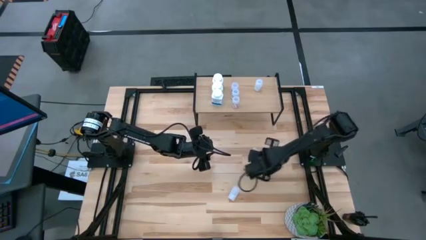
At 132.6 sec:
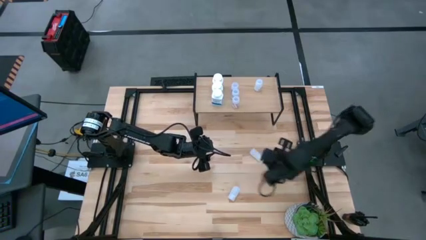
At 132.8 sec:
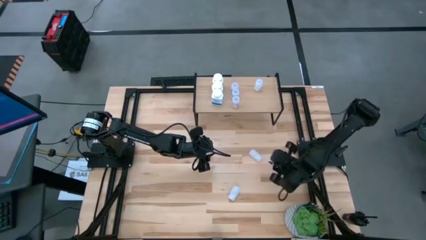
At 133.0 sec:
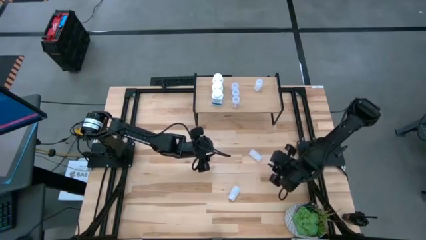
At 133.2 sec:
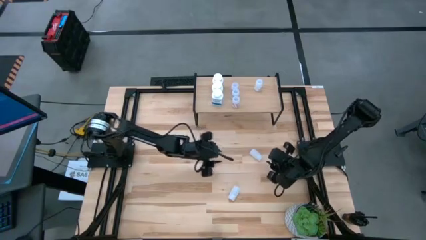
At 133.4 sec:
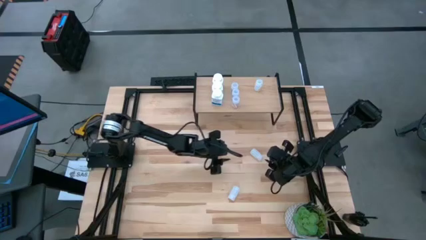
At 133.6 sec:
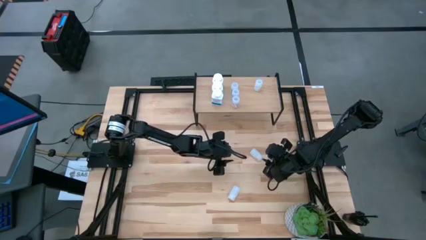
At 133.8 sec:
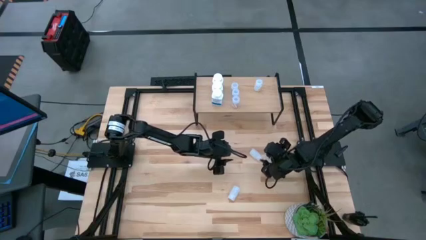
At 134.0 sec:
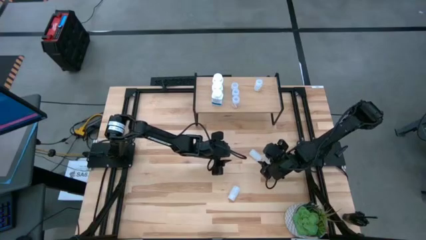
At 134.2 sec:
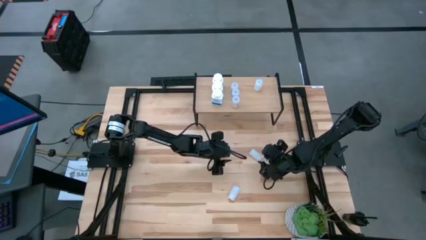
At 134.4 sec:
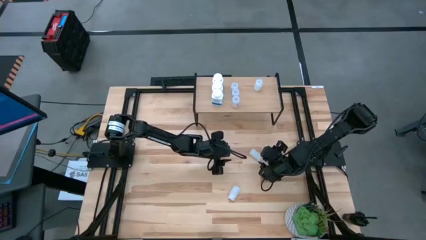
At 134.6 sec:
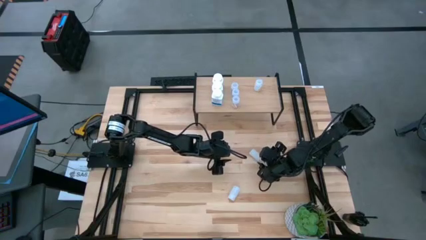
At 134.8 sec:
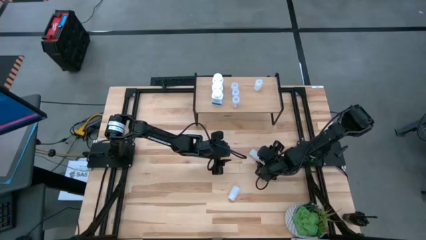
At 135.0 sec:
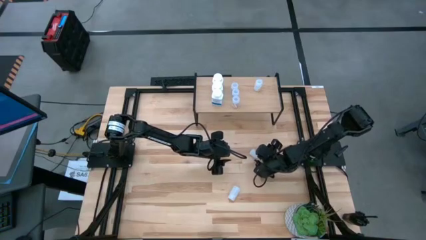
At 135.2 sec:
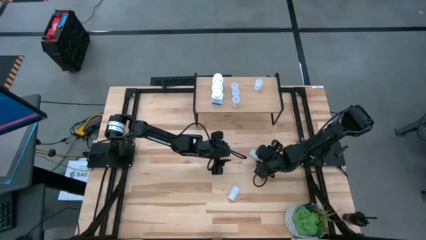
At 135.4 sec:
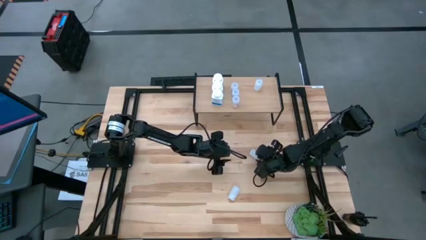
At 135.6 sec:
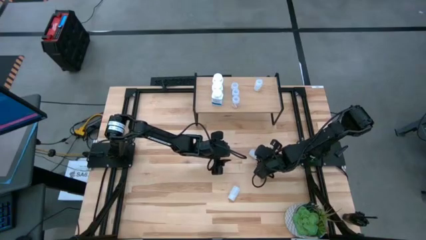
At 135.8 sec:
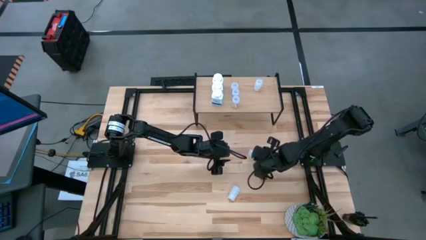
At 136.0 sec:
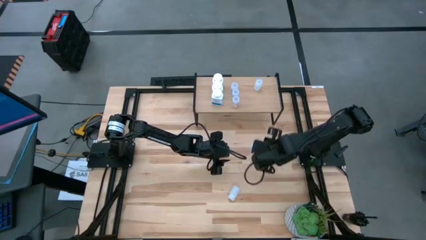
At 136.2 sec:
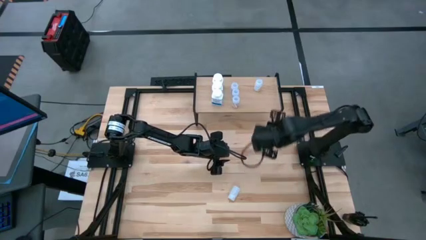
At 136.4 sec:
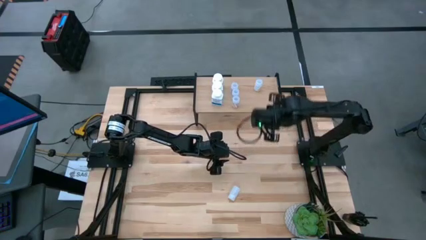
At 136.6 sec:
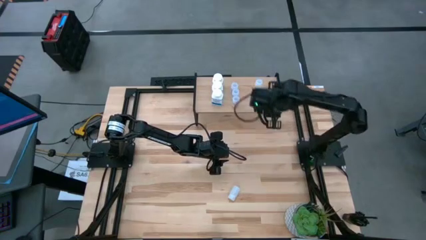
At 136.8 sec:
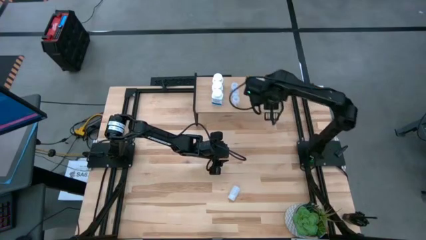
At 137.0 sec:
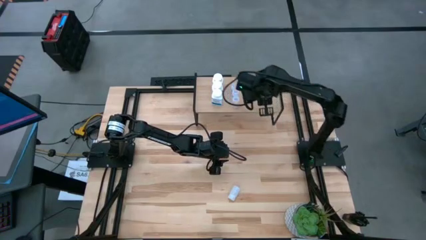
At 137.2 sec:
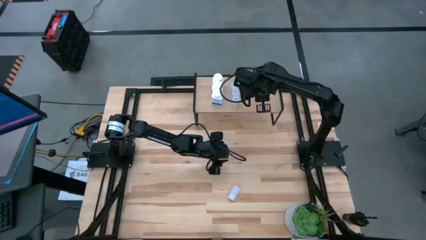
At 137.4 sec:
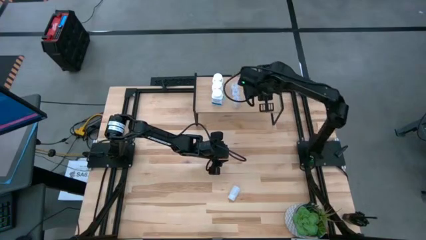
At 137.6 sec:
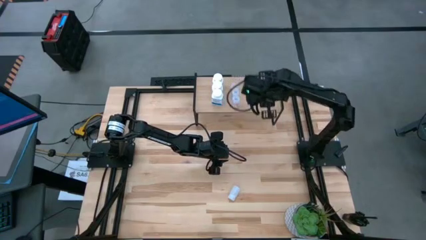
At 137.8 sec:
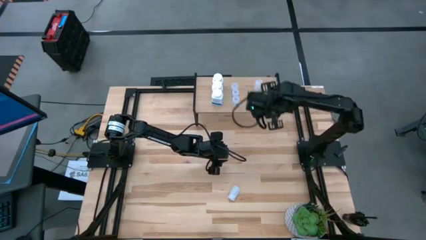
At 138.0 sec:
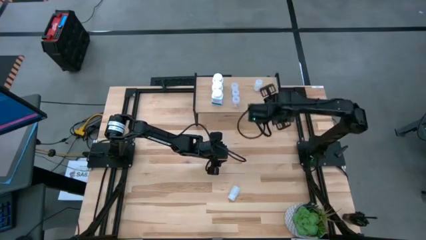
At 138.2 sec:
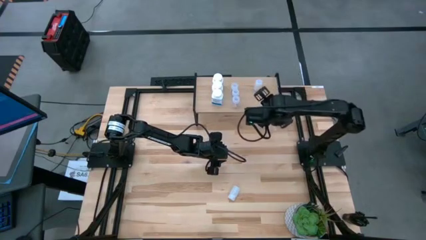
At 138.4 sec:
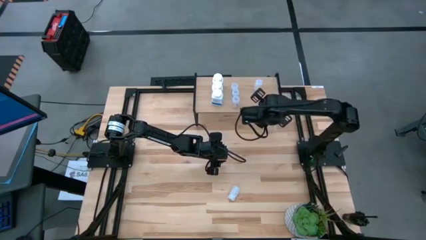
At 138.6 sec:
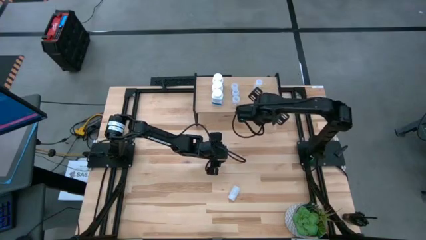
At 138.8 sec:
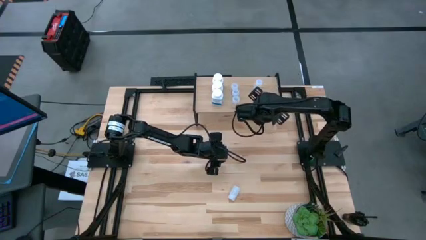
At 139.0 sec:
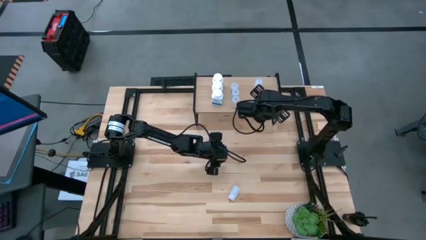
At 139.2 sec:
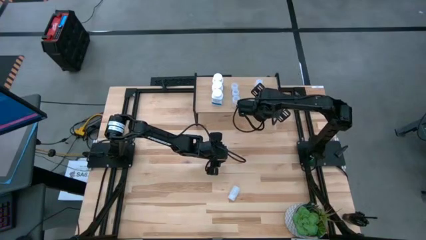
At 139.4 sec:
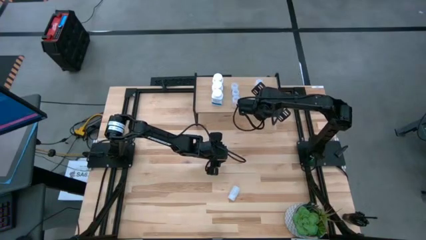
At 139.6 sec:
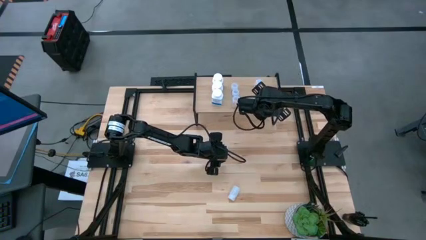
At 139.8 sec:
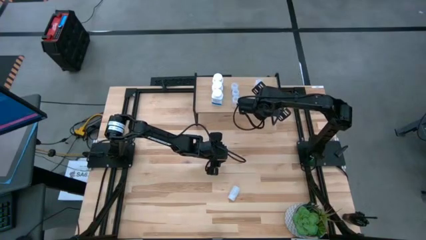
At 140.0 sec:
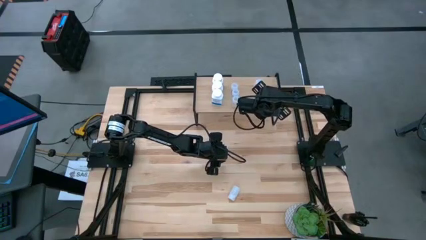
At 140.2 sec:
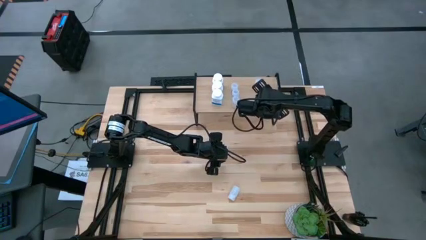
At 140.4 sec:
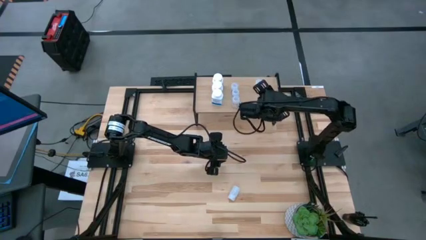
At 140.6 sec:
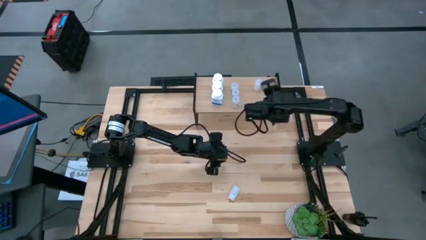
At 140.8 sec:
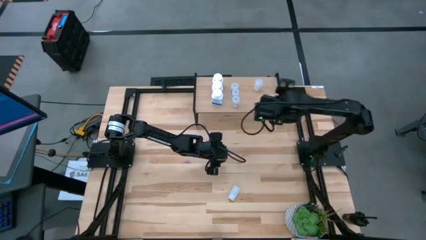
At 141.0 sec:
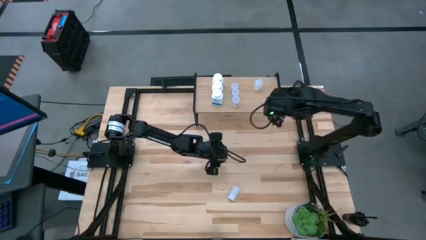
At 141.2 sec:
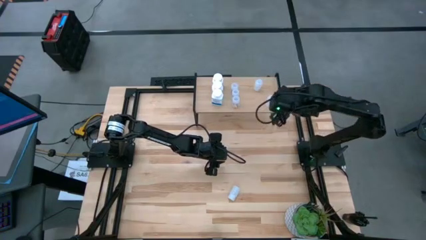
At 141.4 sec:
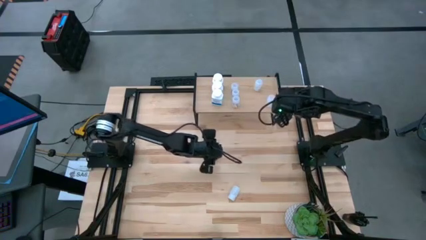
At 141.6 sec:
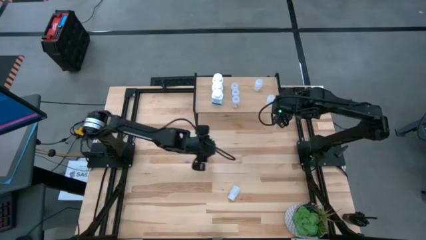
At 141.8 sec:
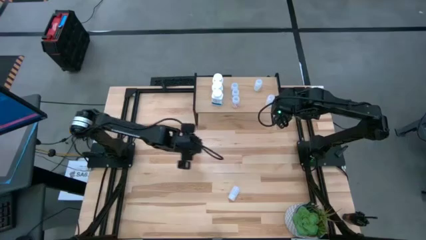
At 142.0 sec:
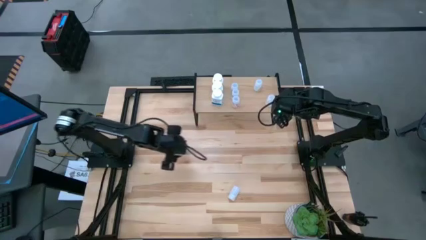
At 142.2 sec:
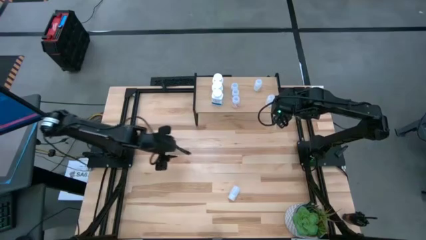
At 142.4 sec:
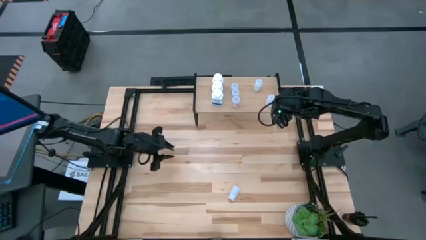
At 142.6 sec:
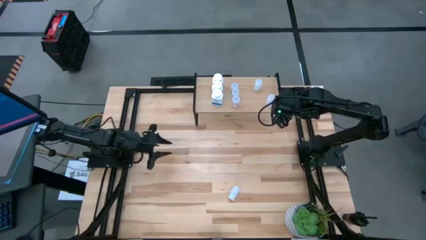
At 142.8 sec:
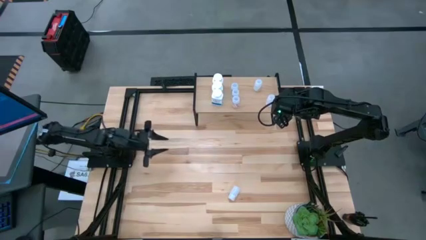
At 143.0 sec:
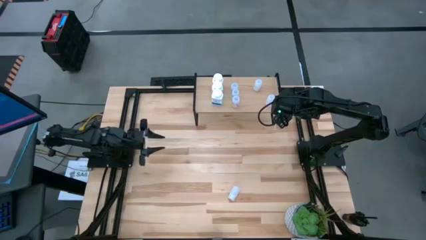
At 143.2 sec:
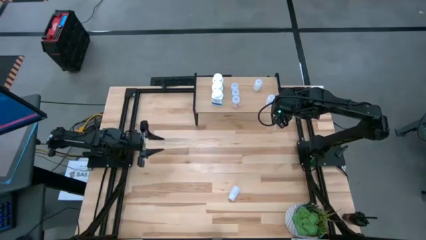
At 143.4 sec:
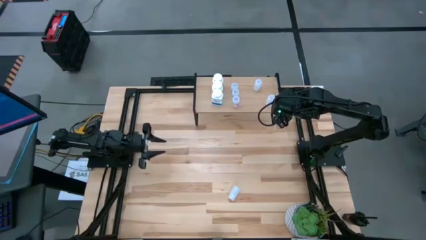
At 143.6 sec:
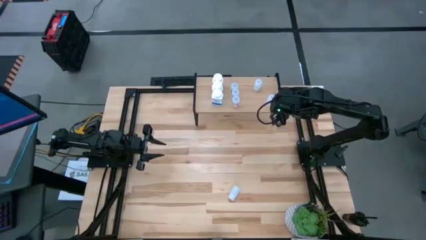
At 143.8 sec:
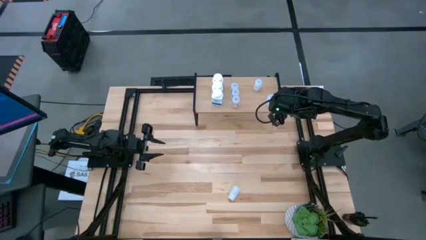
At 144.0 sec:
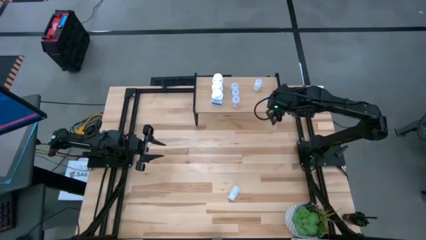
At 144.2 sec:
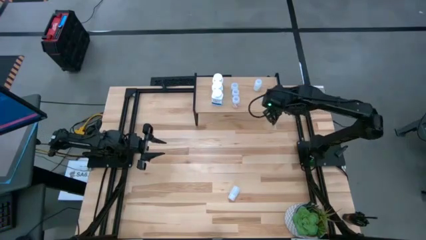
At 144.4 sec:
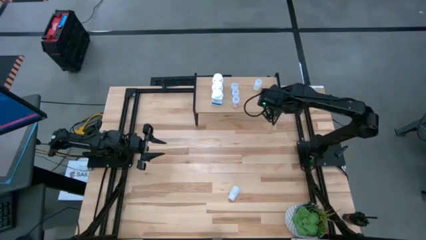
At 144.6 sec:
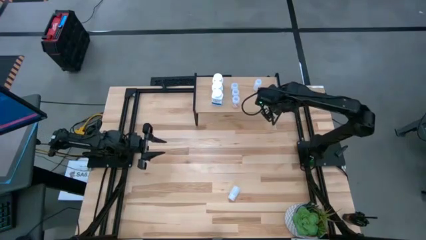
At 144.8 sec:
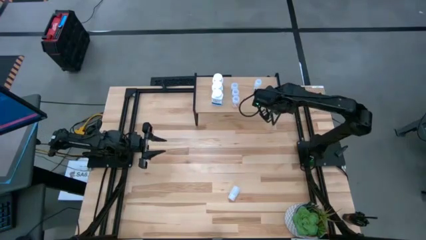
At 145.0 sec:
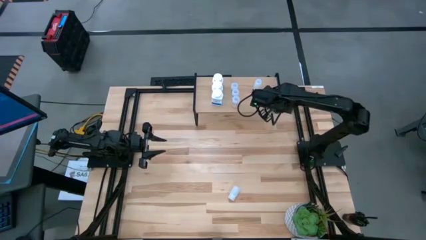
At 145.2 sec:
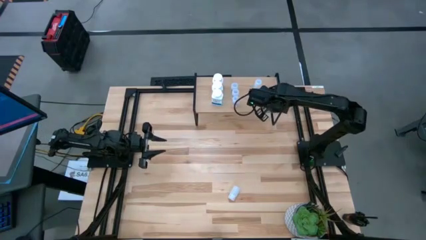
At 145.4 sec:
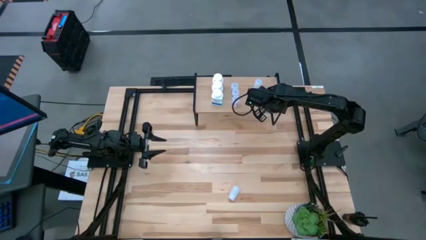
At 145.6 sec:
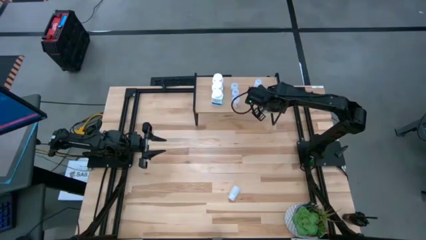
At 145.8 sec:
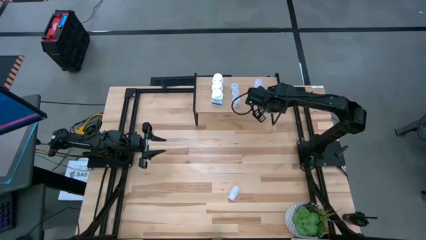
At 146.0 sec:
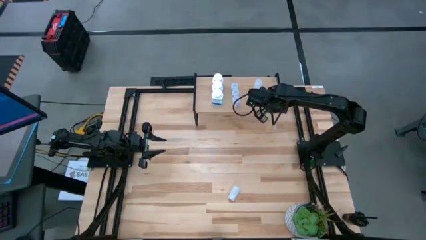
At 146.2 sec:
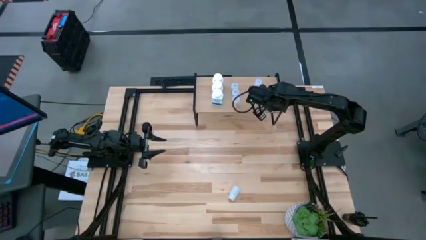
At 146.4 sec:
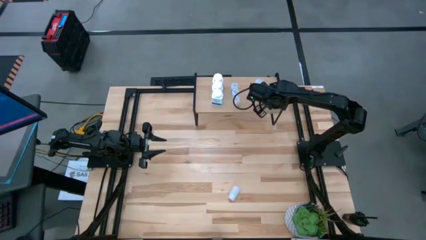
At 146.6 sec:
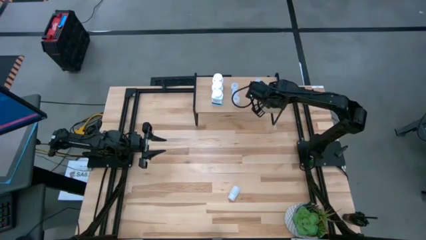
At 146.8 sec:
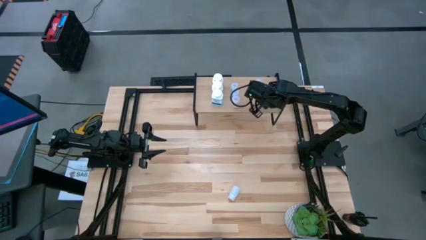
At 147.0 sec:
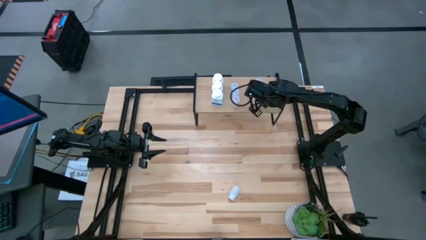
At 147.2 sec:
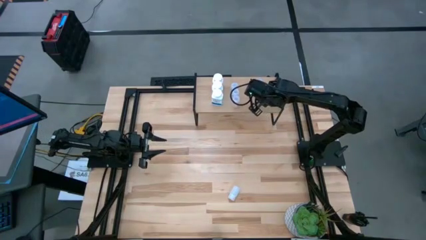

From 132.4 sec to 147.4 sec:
Task: Pick and place medicine bottles onto shelf by color
Put the top white pill bottle on the shelf aligned with the other white pill bottle
